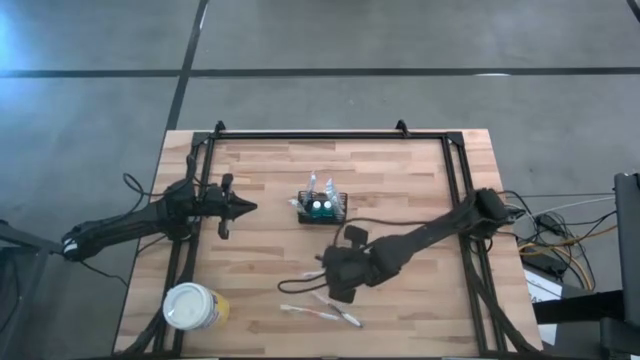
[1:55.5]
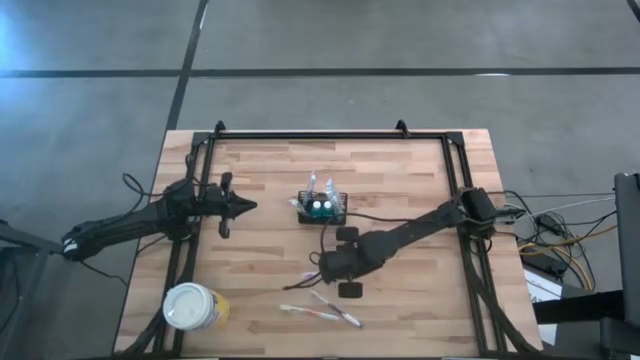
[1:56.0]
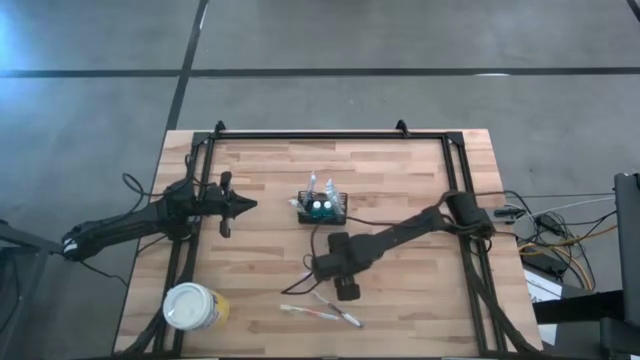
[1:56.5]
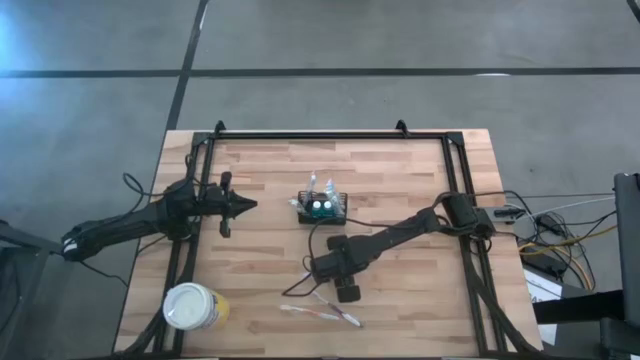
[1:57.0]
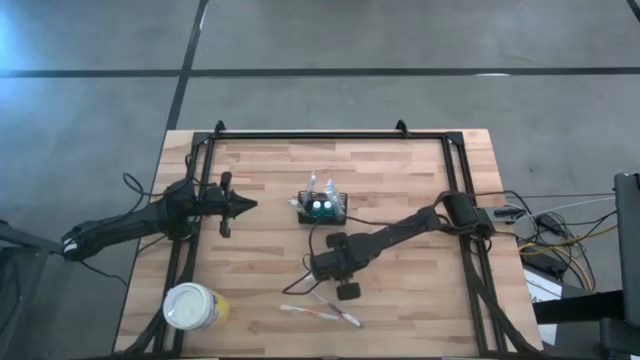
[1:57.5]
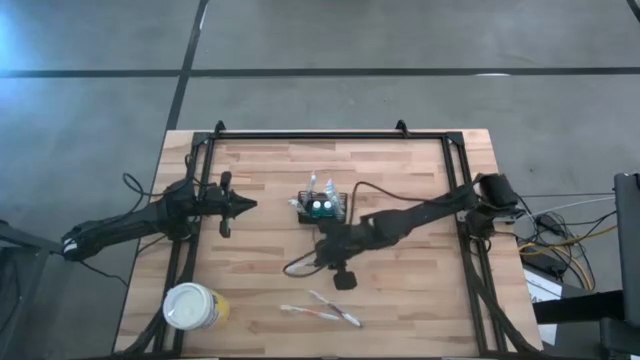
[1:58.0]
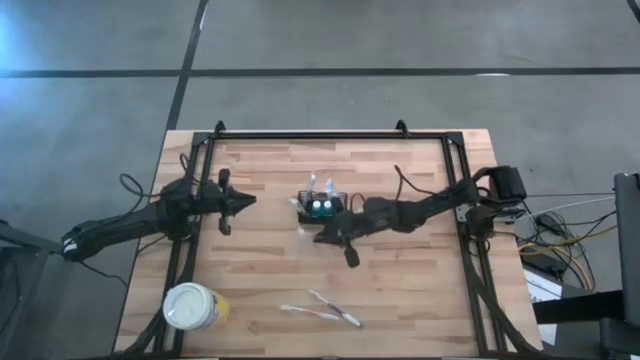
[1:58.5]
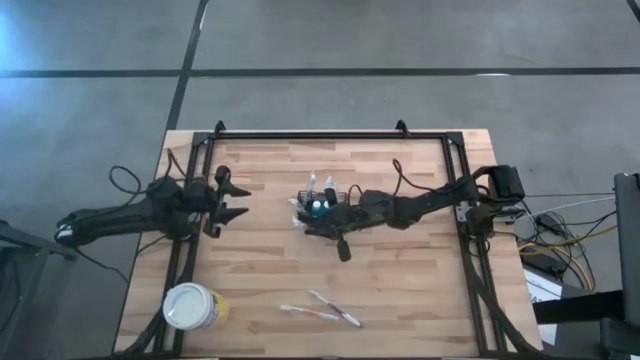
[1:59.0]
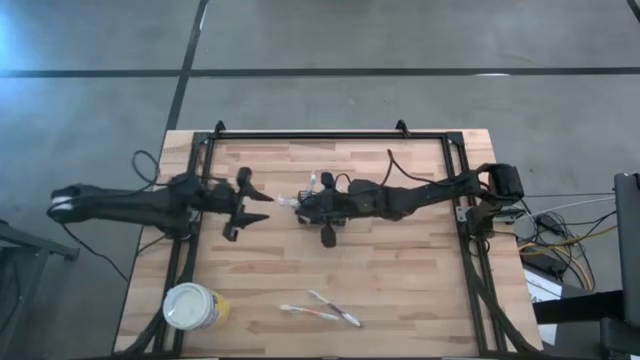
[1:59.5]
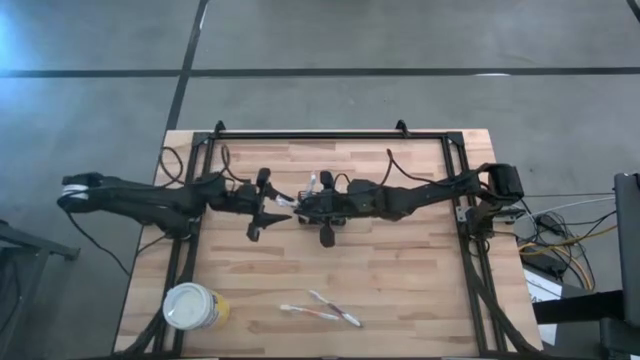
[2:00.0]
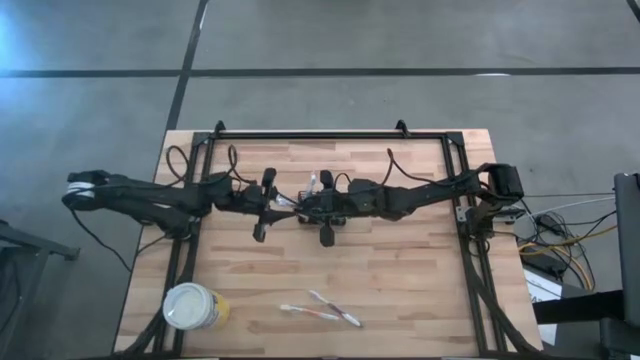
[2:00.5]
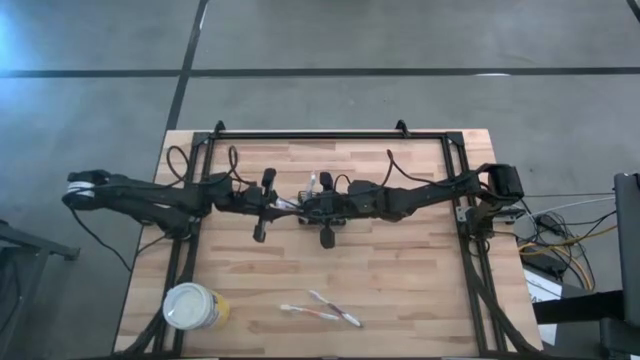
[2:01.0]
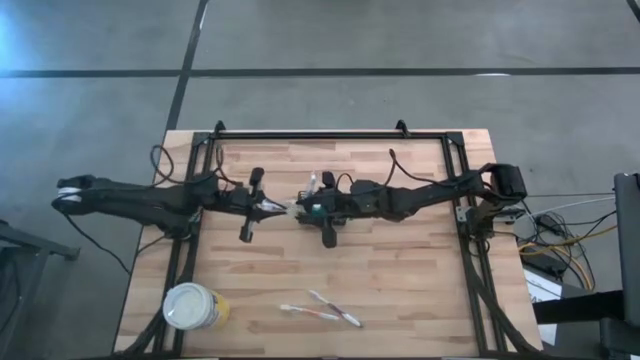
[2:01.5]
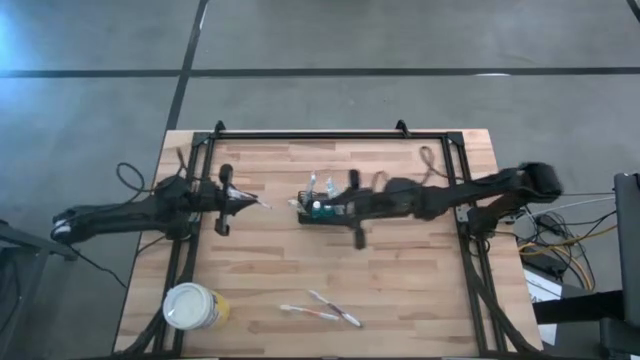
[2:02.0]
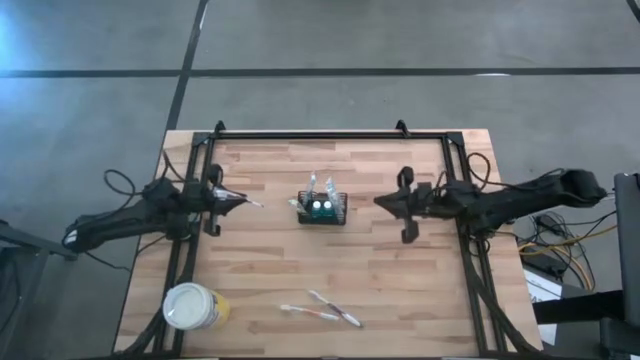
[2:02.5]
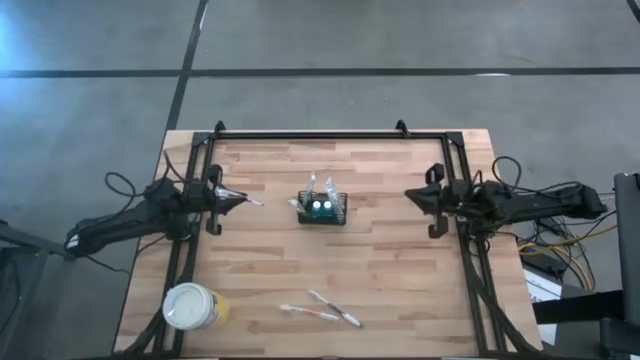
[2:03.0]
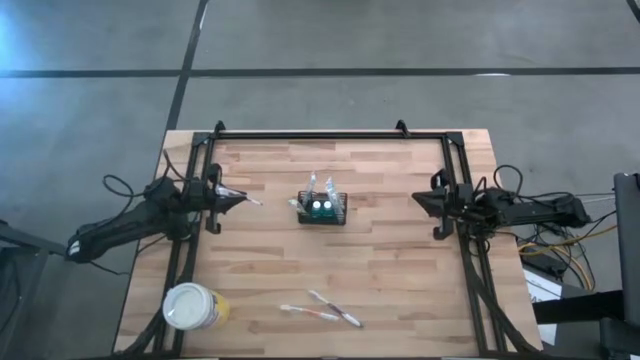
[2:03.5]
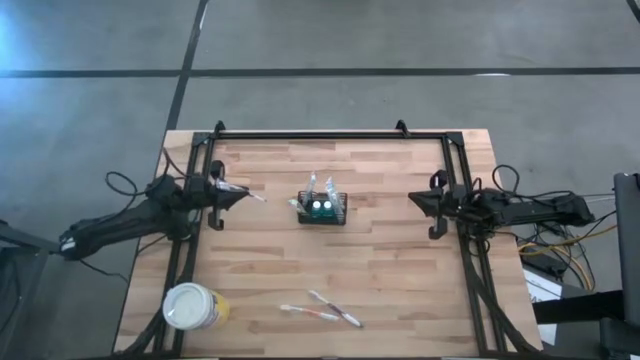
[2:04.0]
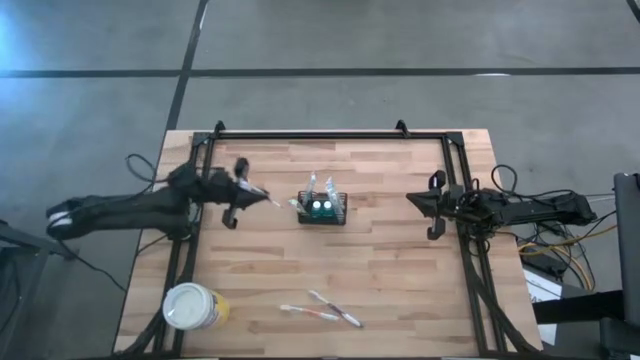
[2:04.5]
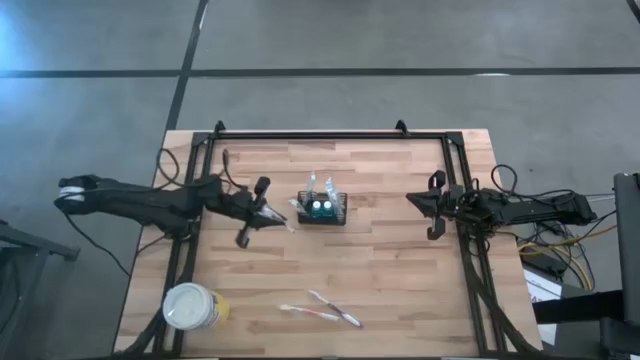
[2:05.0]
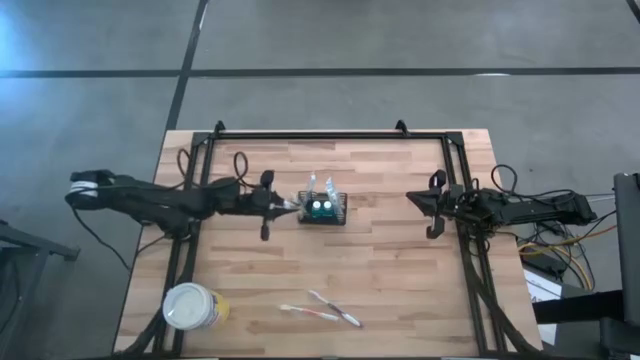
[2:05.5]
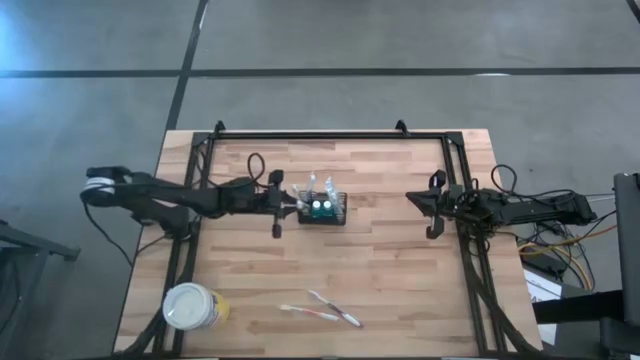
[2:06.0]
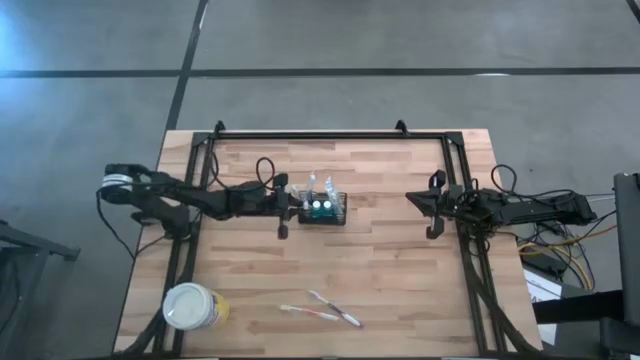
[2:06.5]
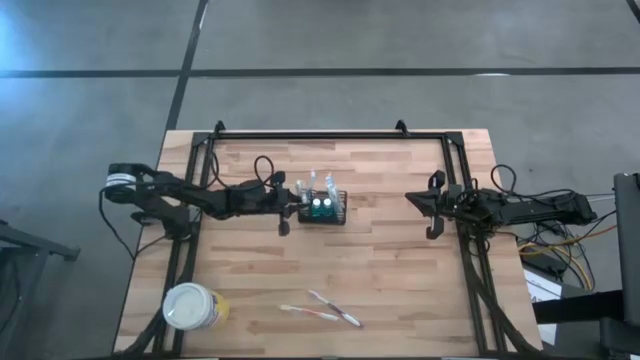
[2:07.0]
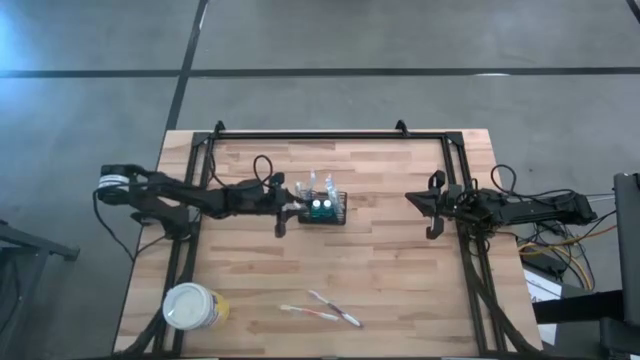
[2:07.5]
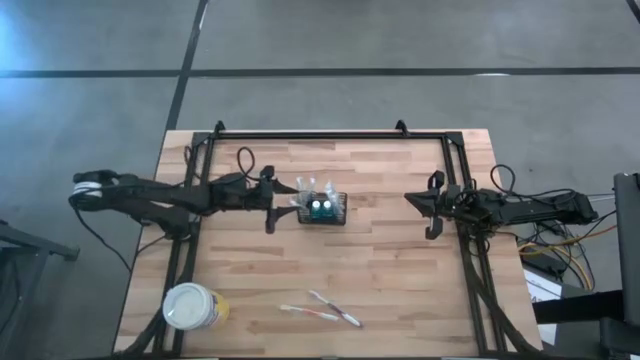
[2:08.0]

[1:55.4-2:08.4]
Task: Pick & Place toothbrushing station
Put the violet toothbrush into the wire organizer

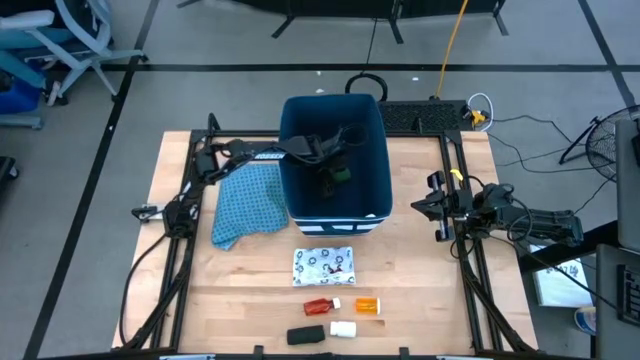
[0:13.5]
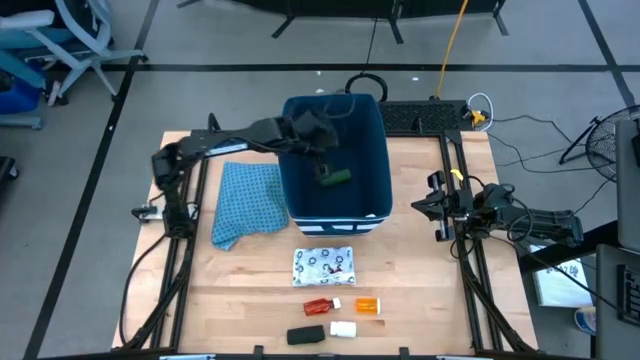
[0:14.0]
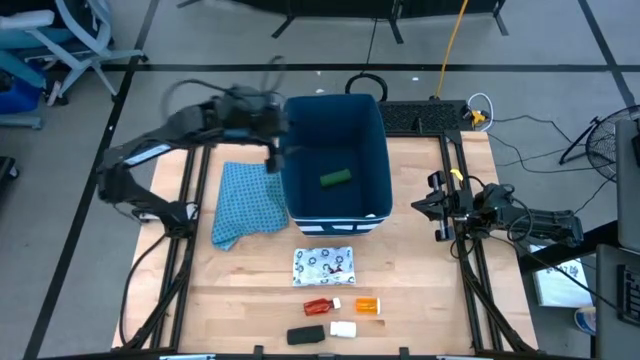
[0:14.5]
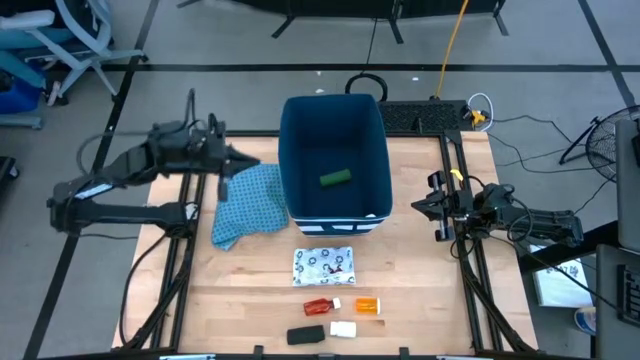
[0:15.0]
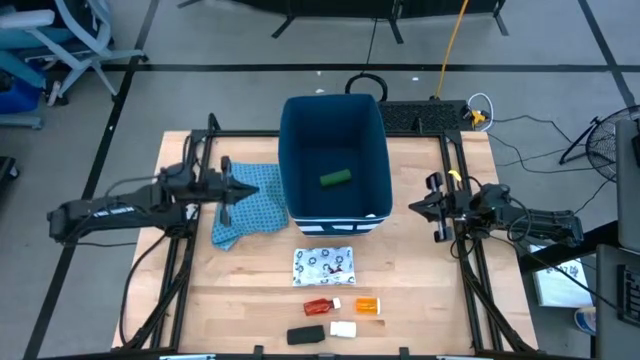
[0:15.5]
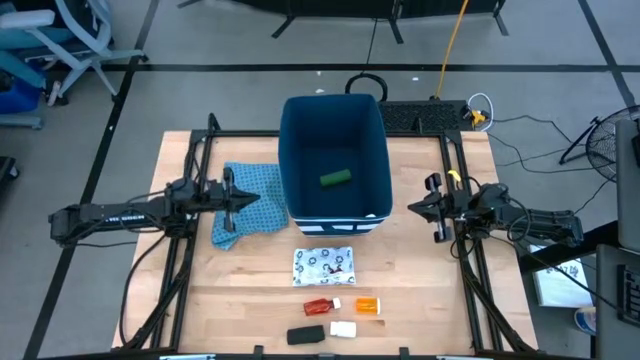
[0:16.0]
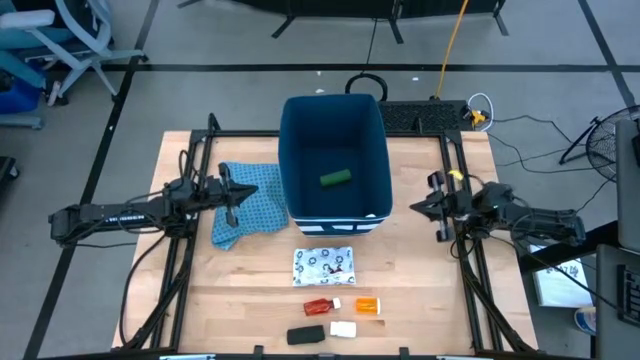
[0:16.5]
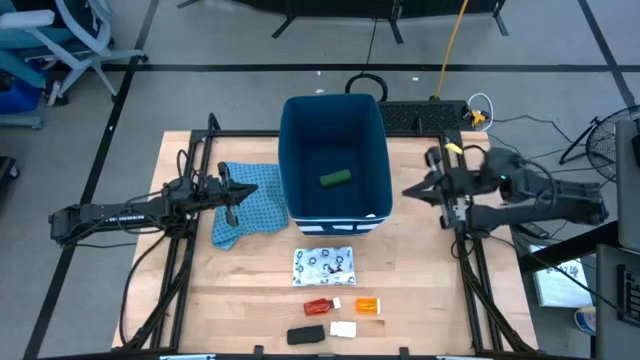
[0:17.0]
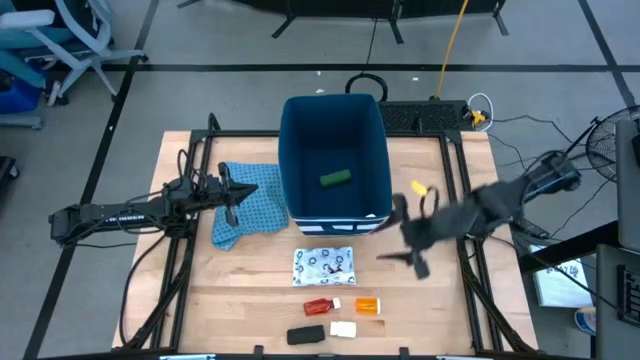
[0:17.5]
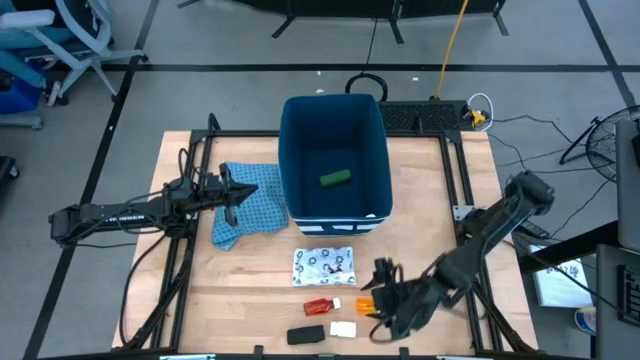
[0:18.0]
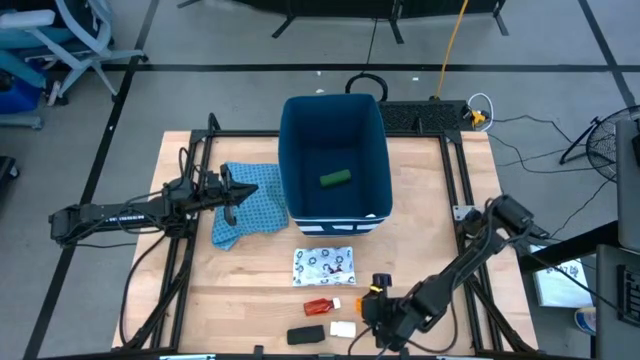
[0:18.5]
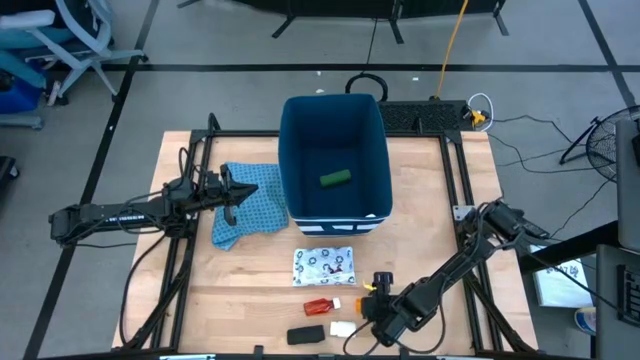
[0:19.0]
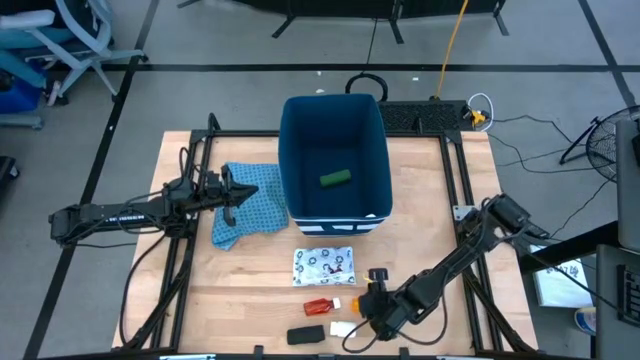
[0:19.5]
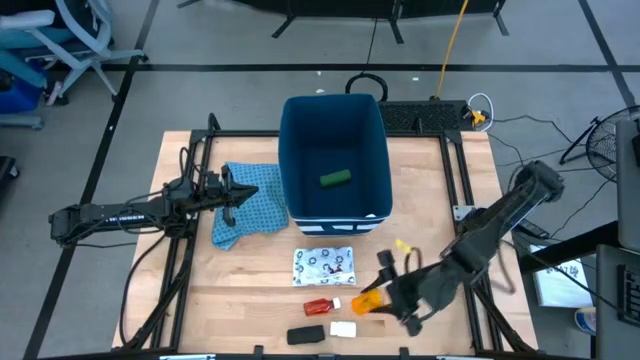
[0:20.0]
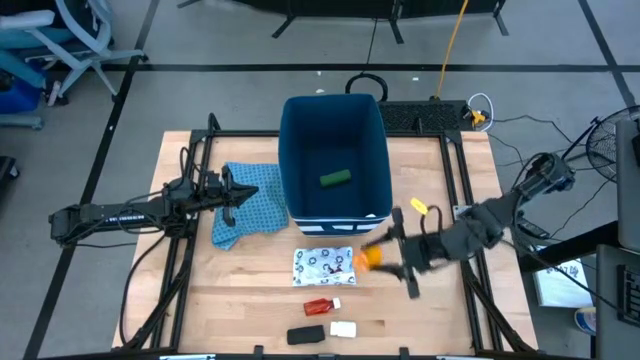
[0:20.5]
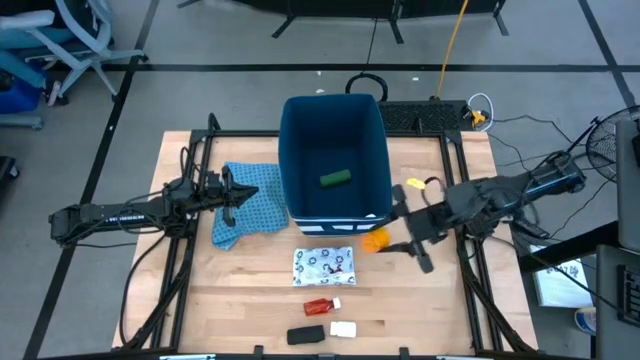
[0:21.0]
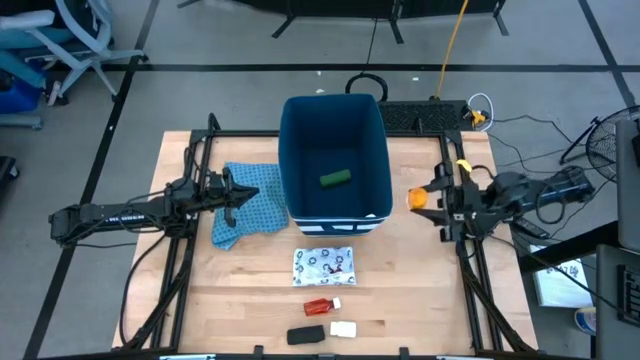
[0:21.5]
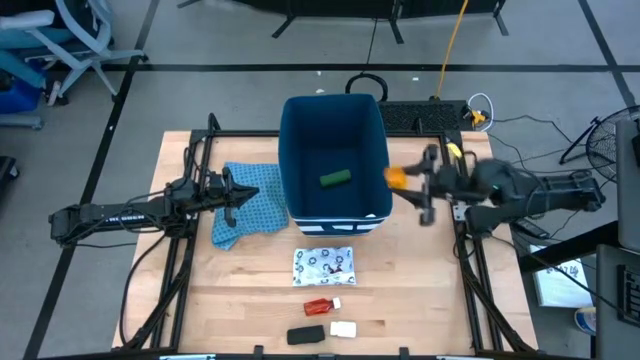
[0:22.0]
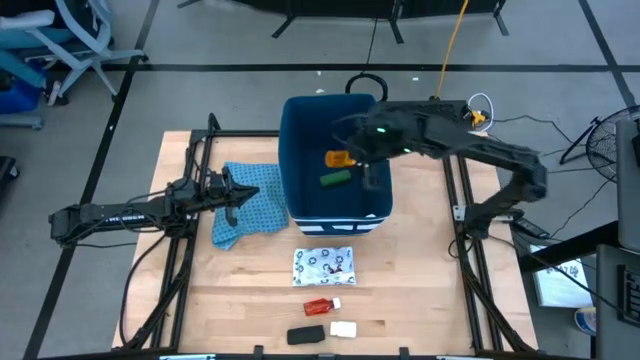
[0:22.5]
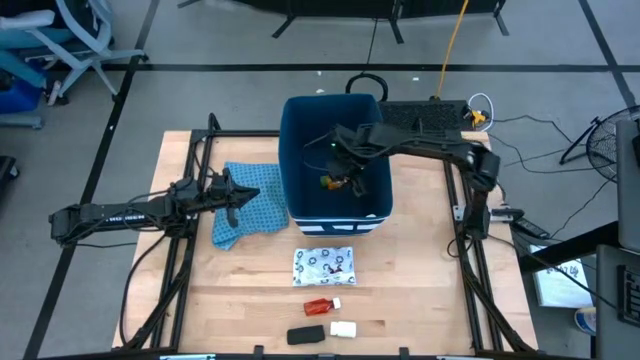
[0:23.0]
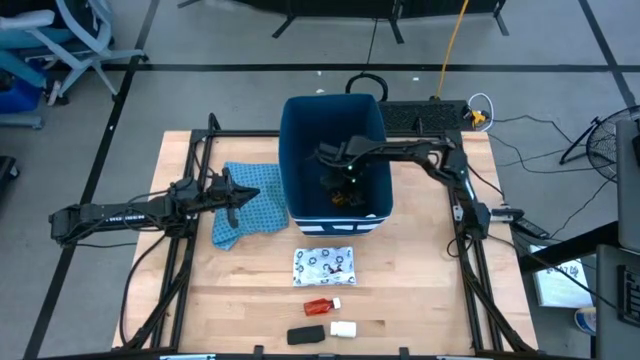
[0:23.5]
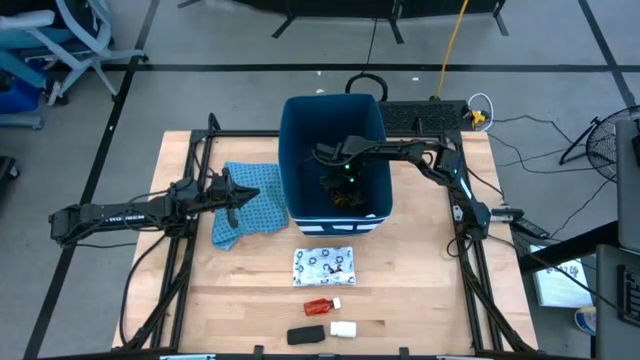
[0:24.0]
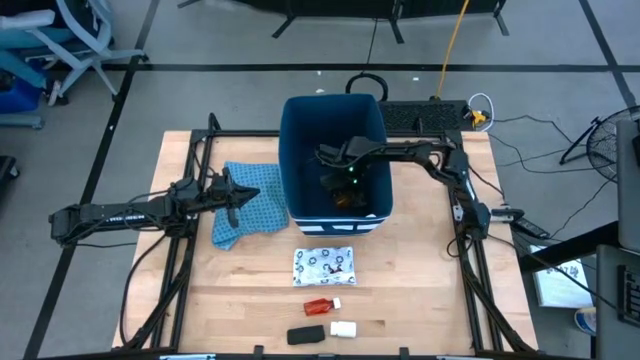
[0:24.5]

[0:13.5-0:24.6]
Task: Pick & place medical supplies in basket/bin
Put the orange pill bottle into the blue bin
